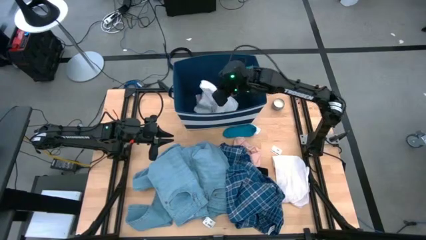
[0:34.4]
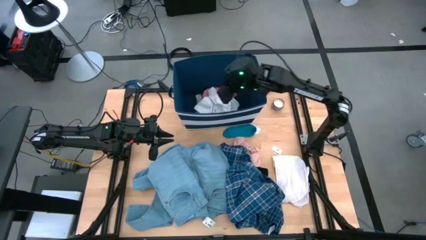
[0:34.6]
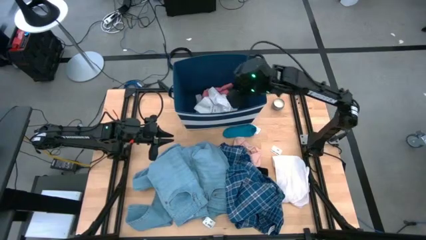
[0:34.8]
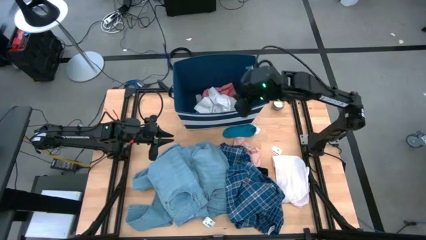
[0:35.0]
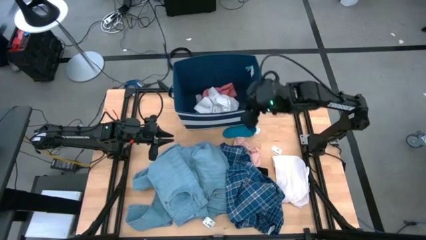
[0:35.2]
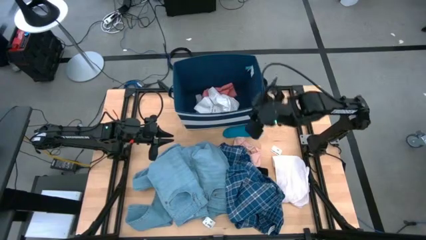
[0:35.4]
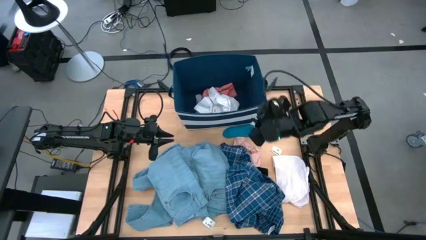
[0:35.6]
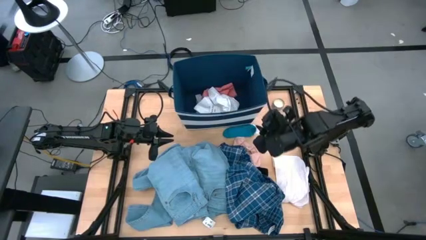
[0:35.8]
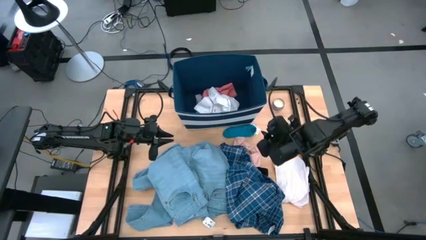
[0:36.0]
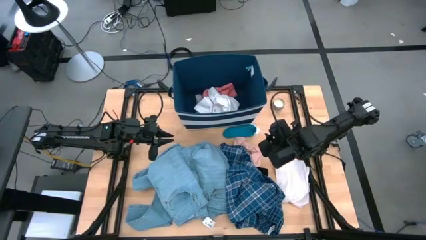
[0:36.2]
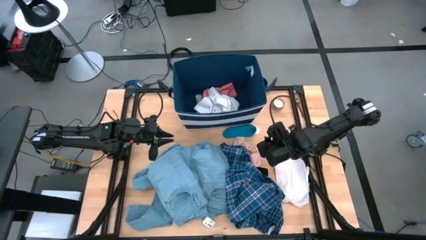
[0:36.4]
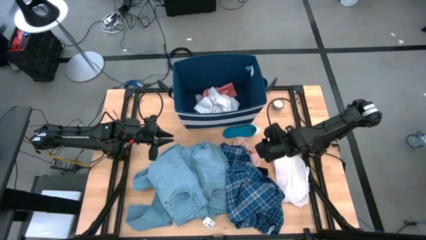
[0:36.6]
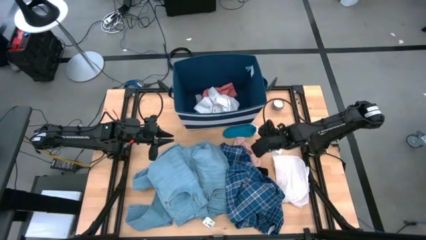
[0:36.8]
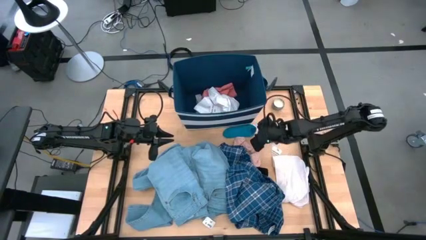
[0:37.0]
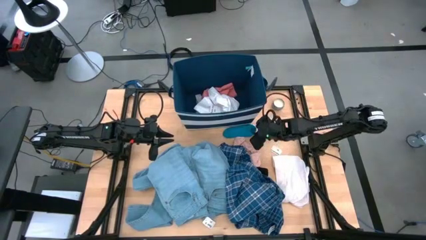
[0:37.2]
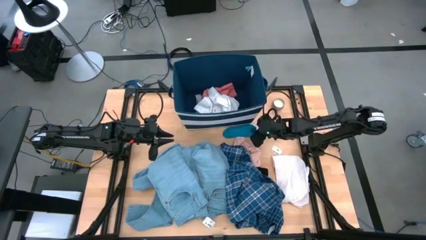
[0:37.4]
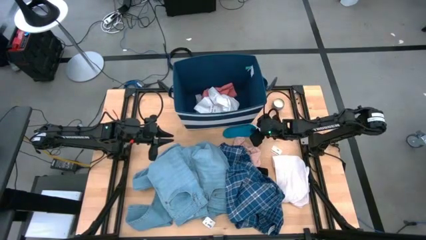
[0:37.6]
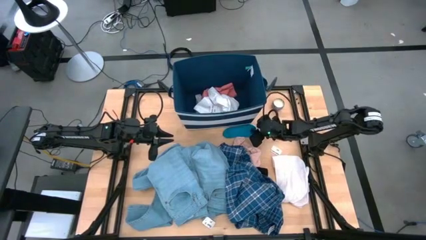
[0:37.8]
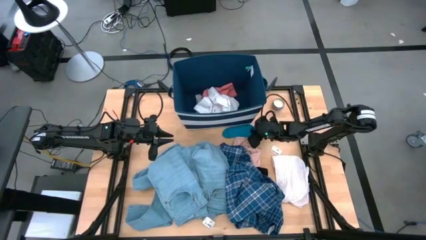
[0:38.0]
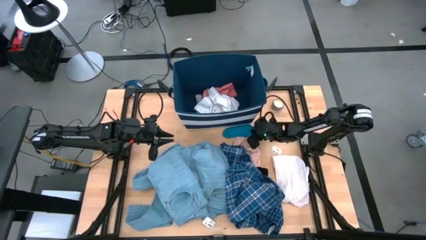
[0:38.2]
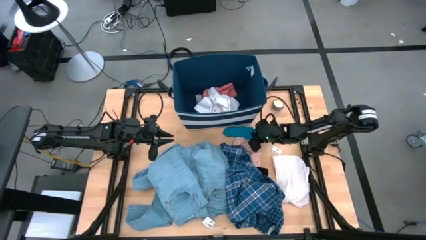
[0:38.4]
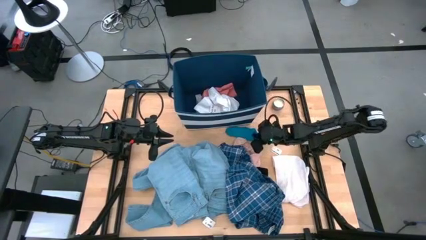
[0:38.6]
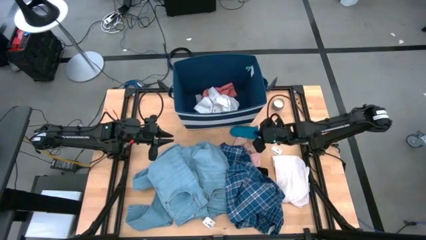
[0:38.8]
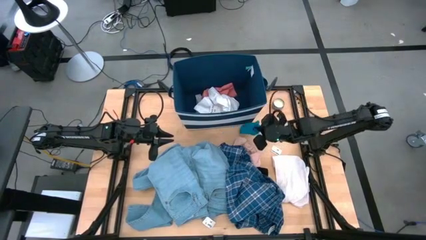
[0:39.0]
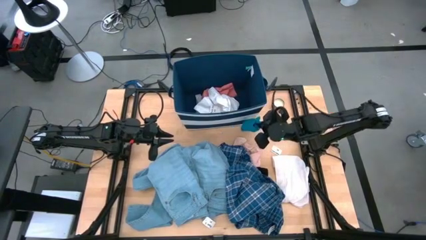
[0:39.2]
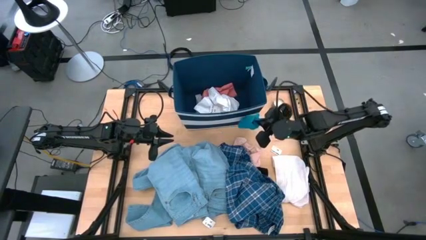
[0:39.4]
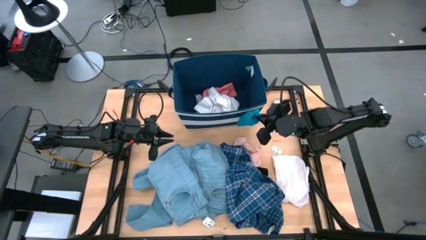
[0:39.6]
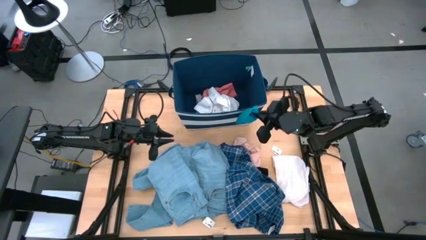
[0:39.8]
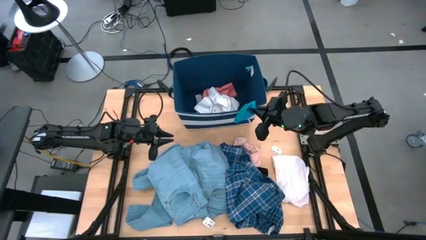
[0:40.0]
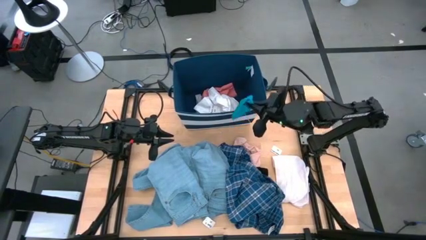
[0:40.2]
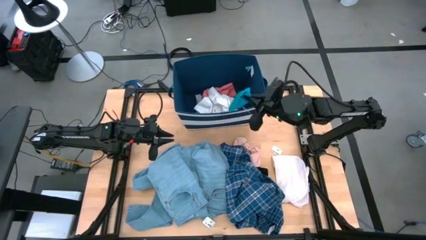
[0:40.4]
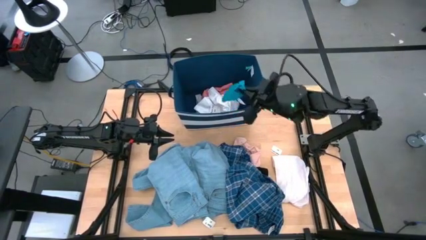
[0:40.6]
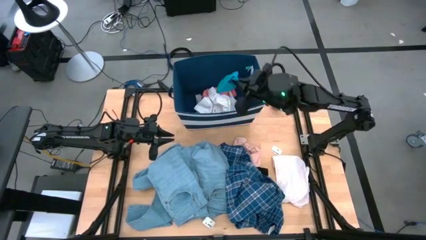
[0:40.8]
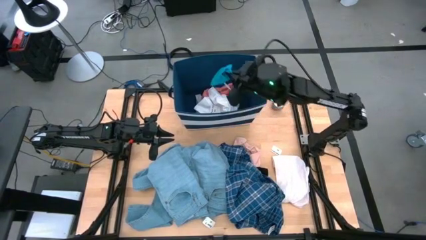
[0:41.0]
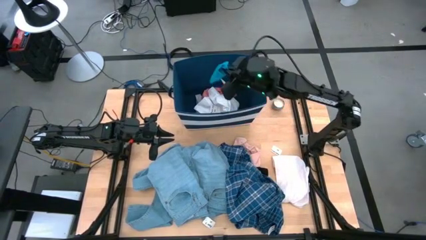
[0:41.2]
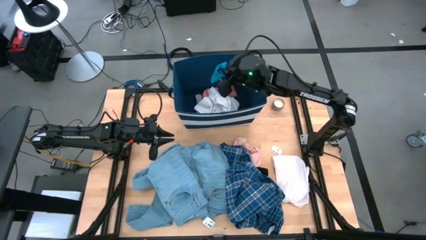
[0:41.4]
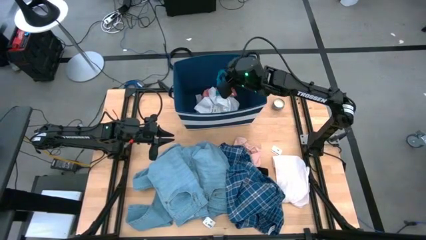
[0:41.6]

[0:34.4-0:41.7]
Task: Sort clothes
Put the blue sock into the blue organizer bin

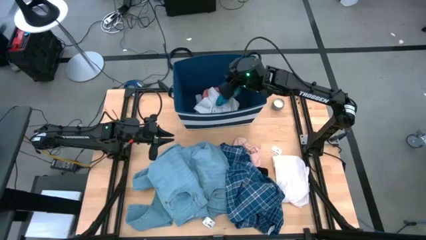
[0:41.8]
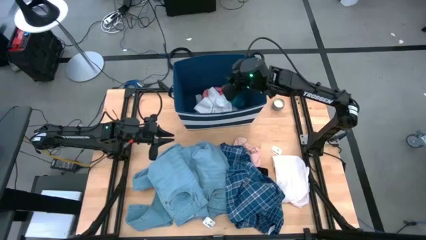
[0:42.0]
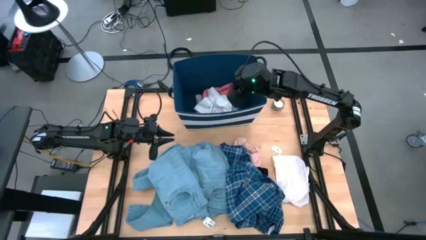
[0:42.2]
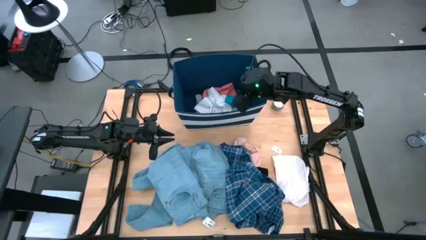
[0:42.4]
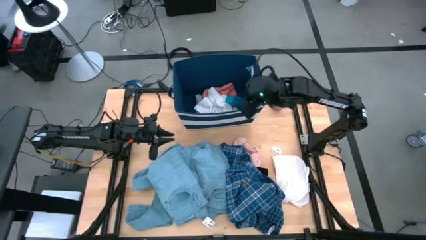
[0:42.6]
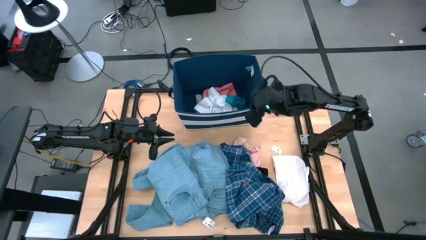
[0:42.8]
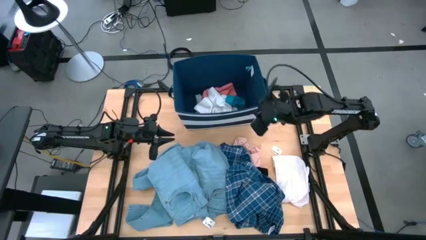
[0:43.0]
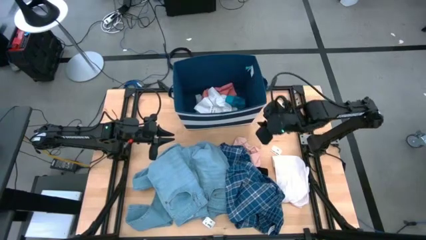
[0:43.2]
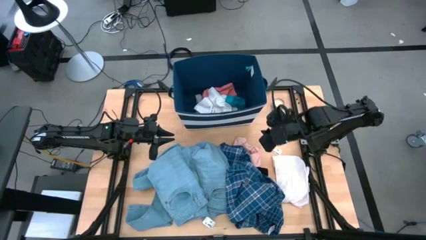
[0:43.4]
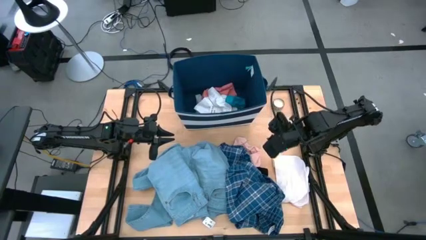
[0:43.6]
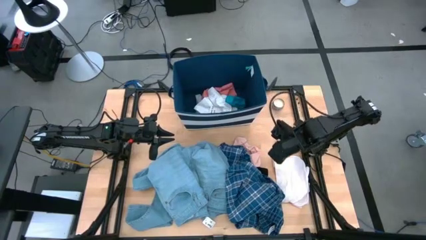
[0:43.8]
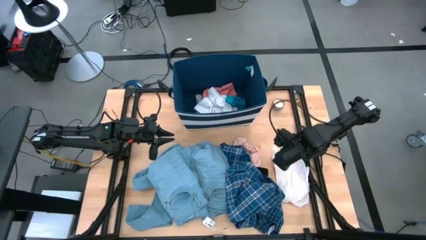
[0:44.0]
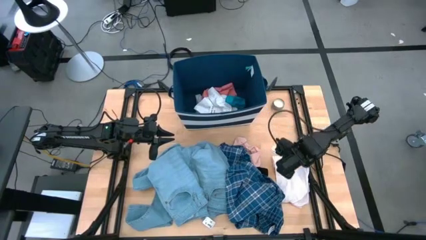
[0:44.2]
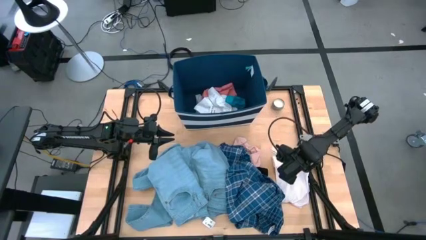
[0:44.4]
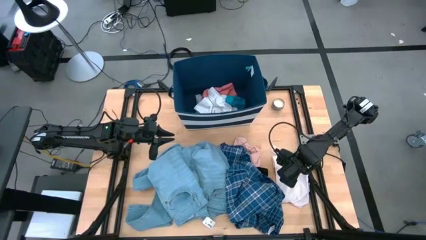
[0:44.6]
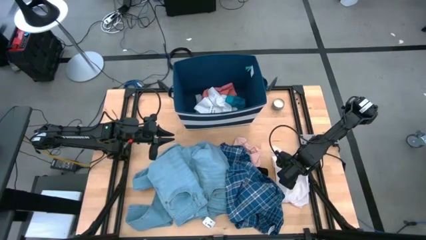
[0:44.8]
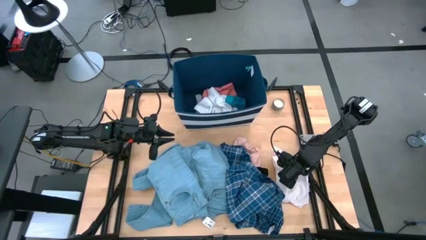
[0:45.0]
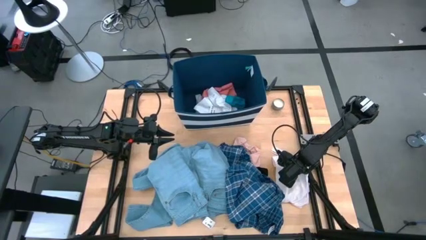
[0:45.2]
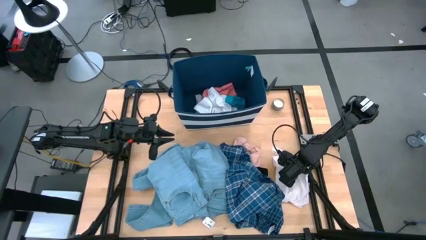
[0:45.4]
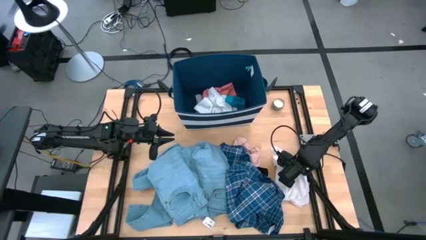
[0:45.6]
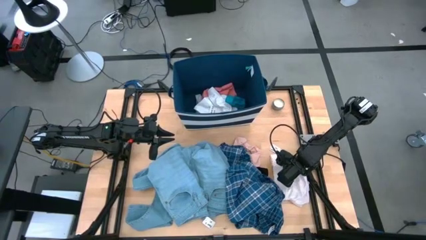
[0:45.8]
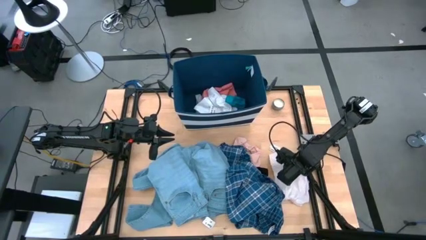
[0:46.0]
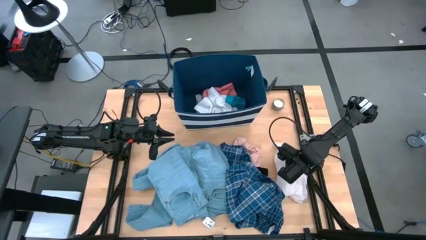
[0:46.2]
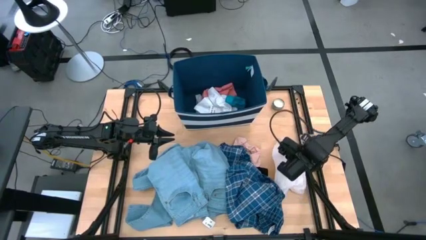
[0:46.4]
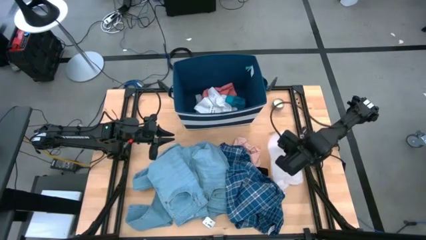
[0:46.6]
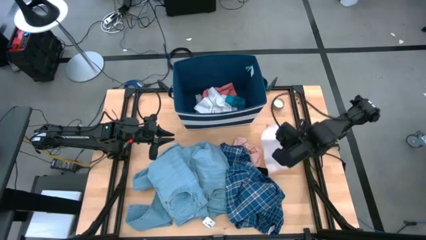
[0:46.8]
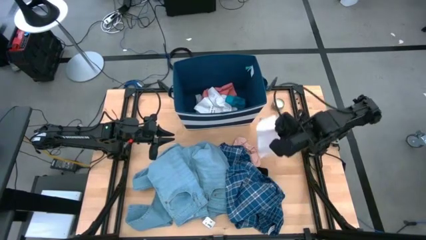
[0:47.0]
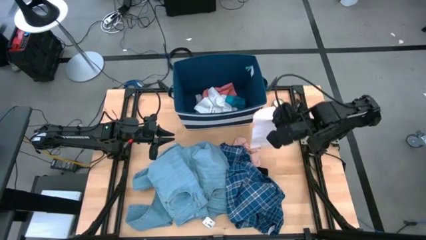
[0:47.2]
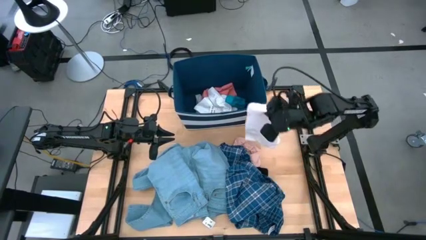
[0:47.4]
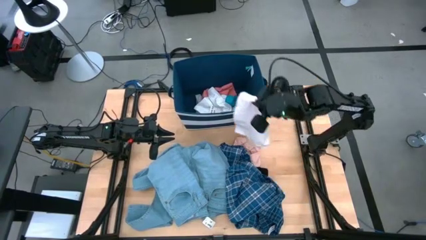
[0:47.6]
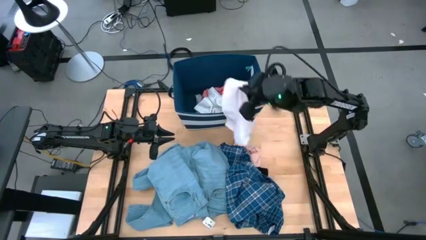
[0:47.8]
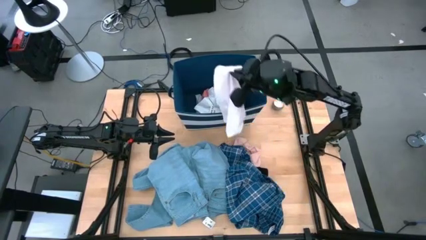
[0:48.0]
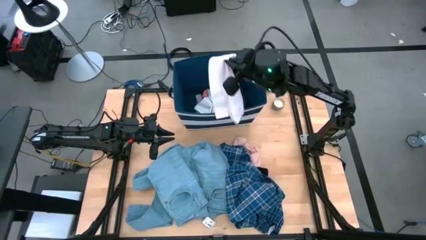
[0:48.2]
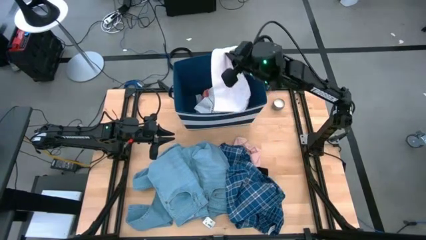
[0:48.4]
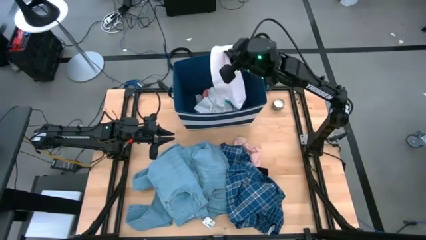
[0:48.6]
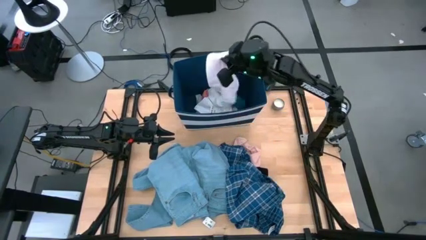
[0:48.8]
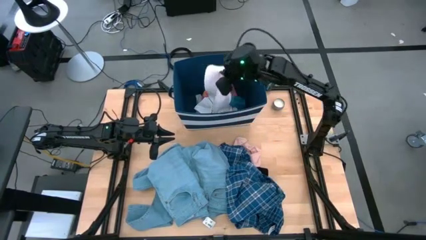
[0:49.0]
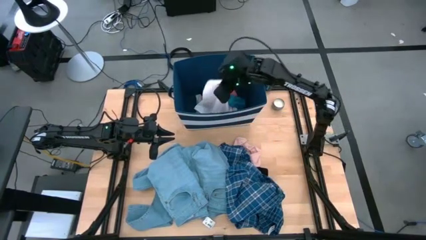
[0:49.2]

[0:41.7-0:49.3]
Put the white underwear into the blue organizer bin
